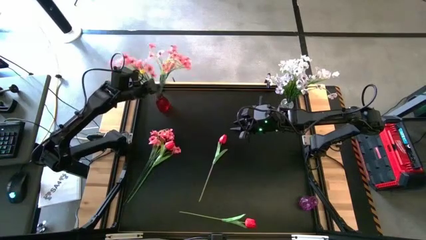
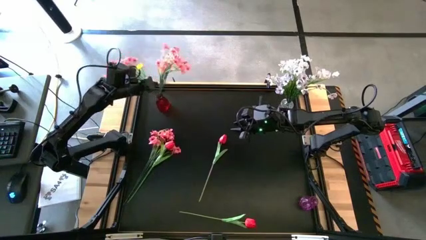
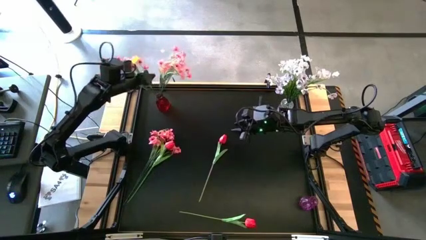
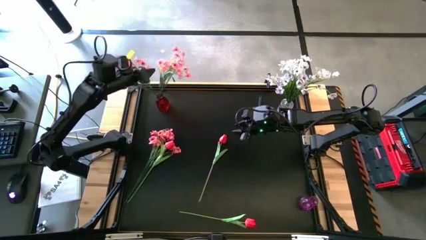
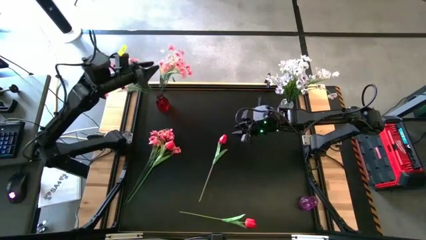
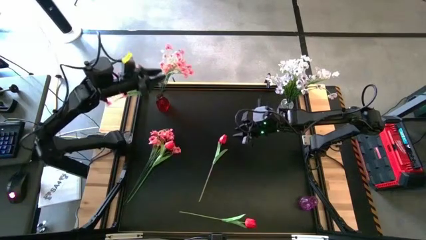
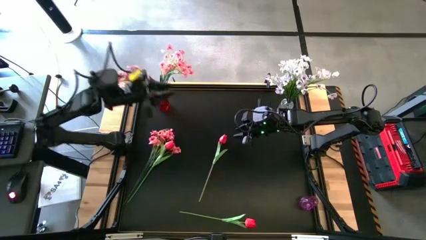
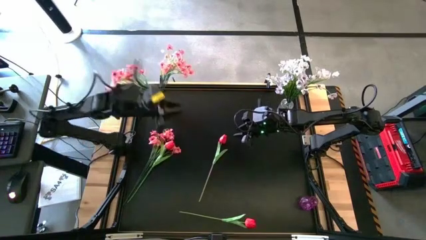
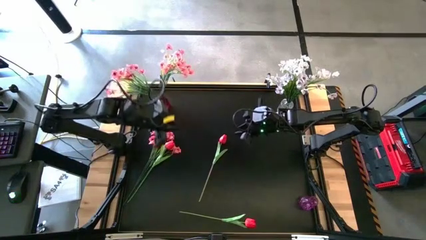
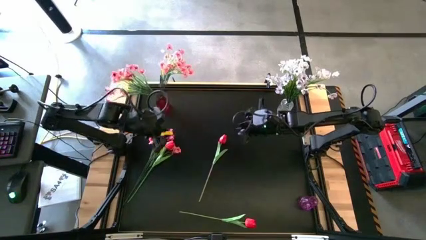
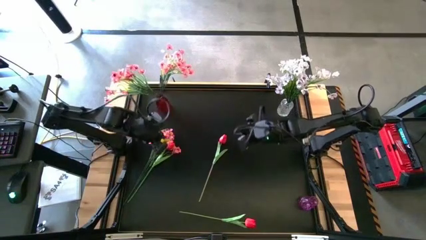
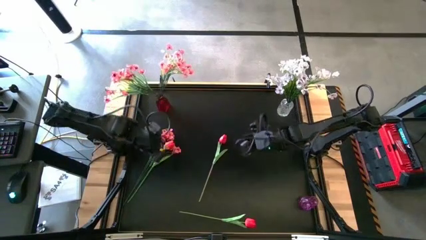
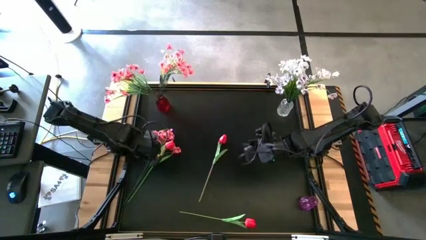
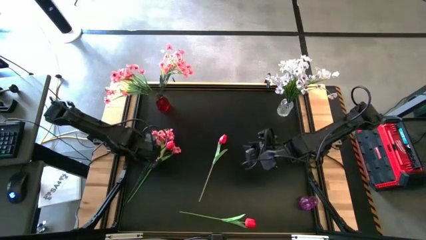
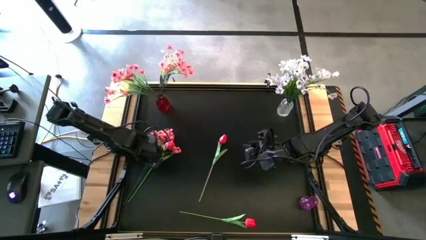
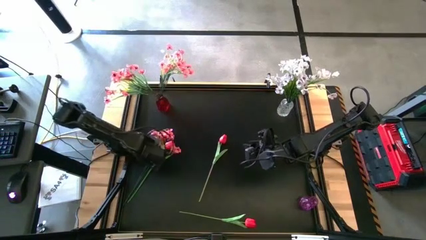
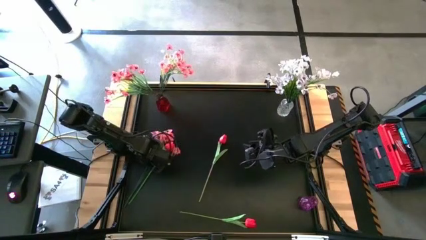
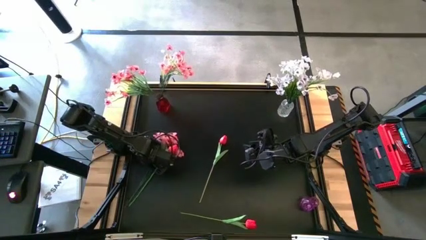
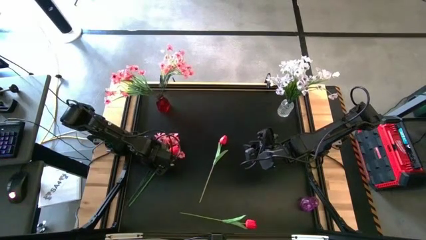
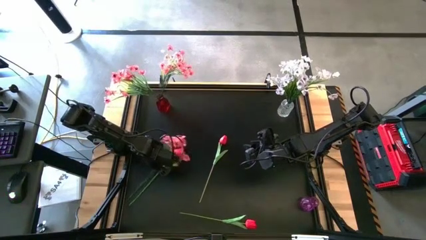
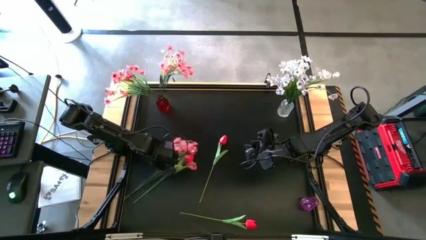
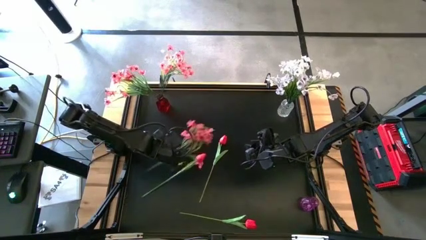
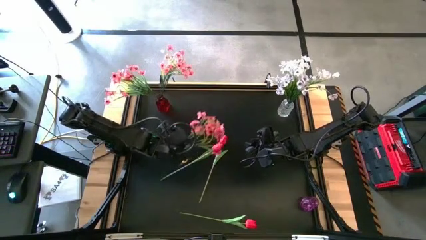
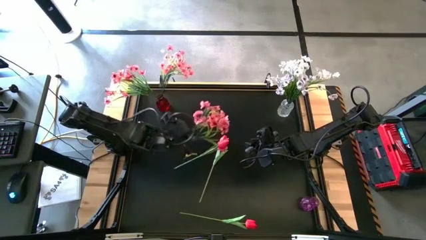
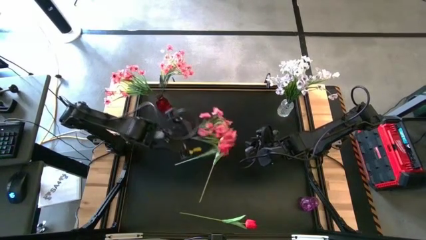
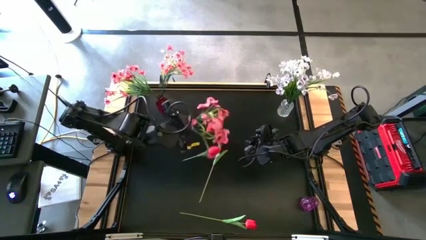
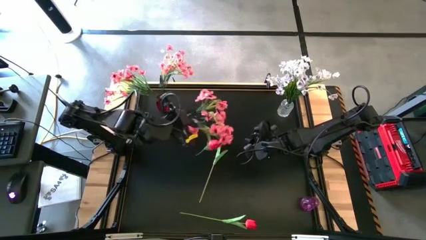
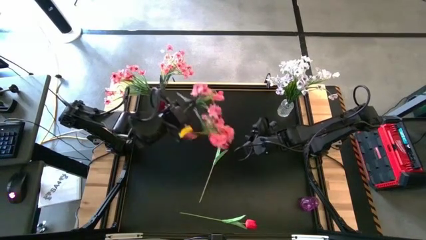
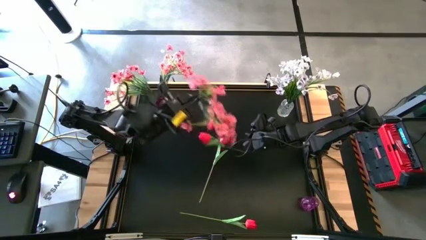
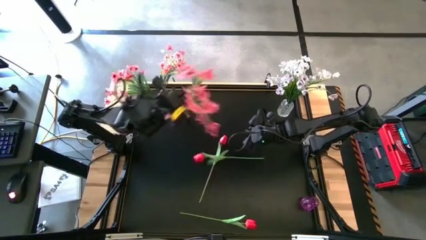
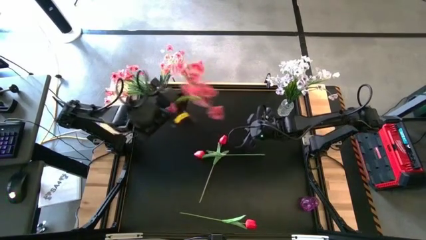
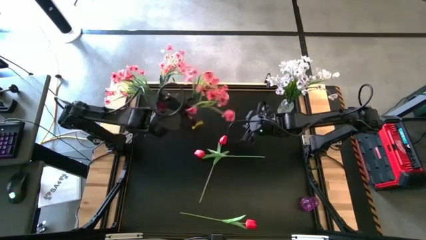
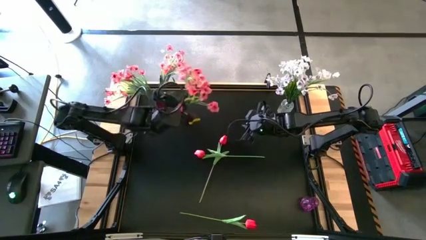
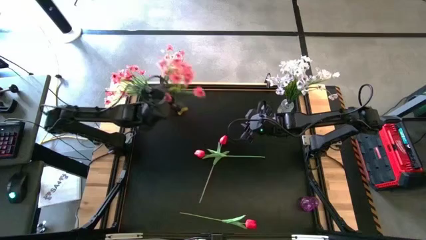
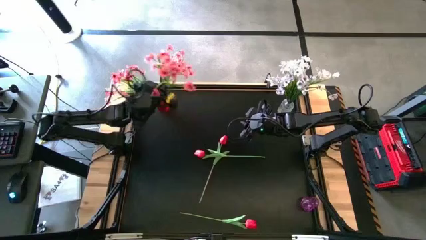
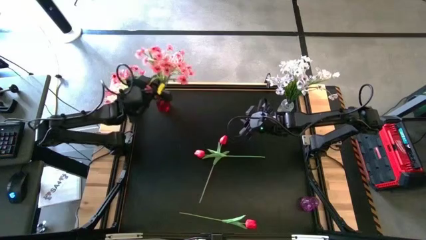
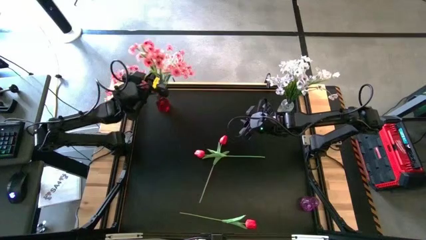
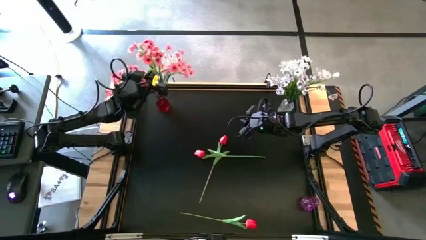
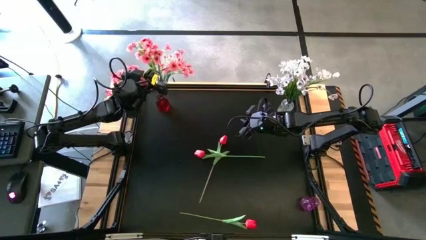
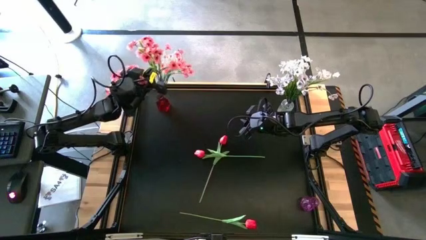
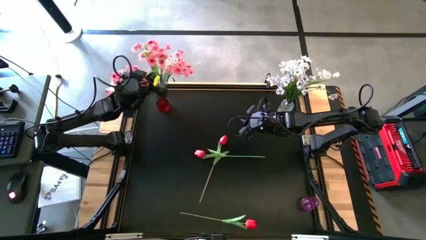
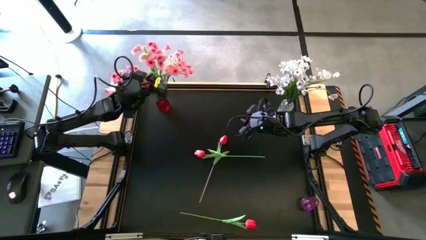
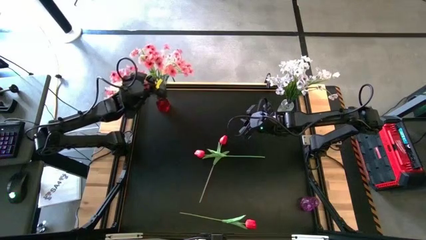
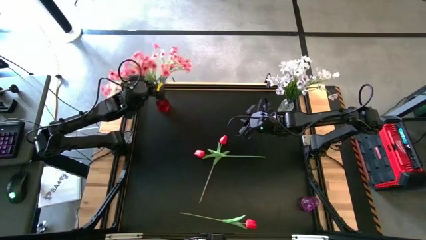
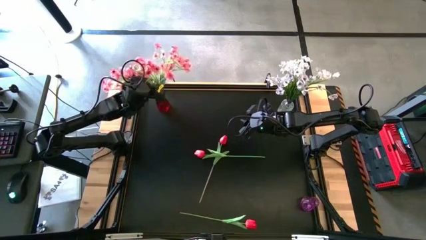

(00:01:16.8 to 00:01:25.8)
Task: Sort flowers into vase by color
Put the pink flowers into the red flower vase

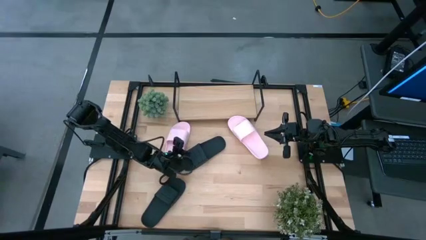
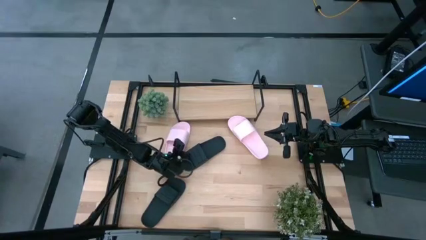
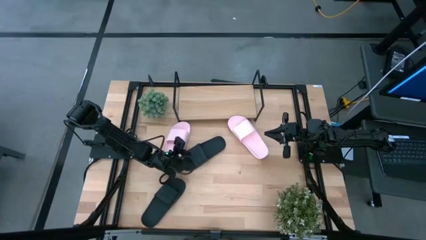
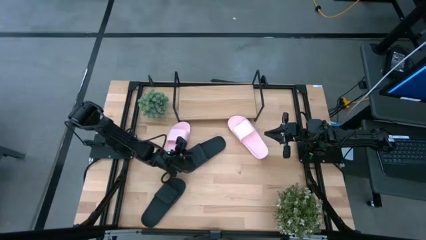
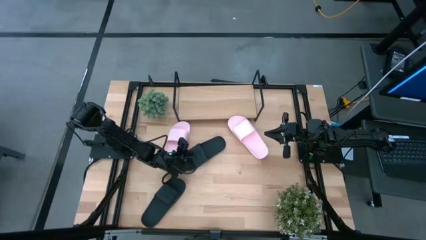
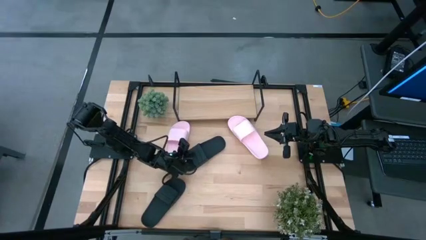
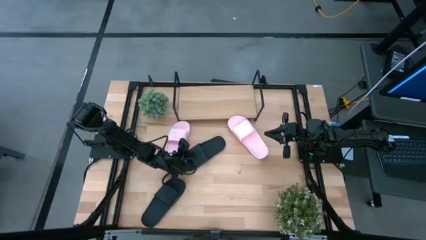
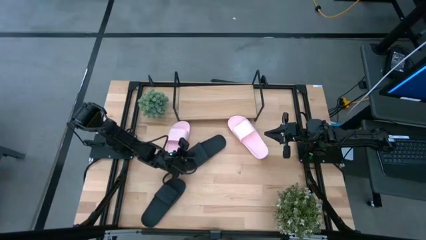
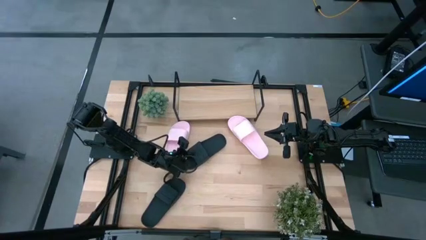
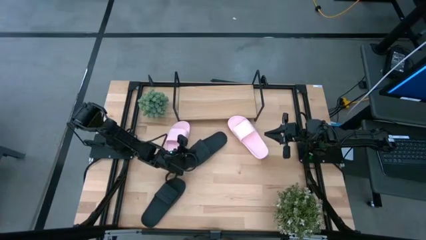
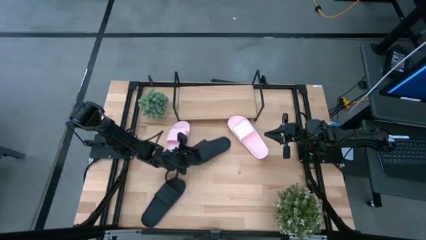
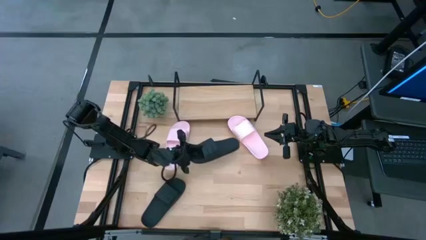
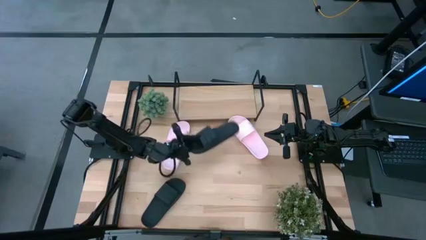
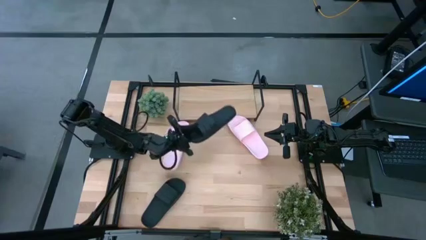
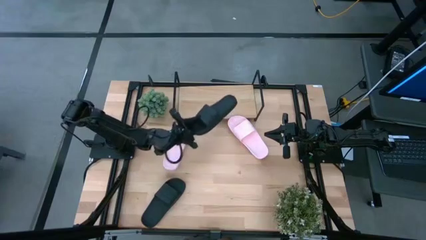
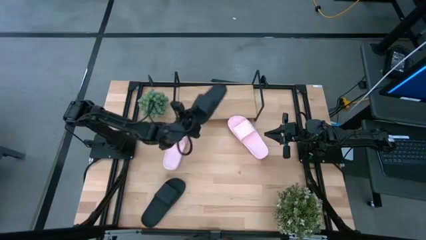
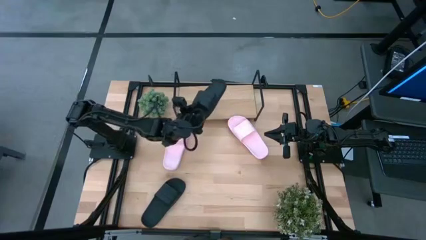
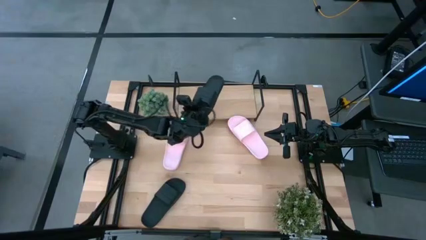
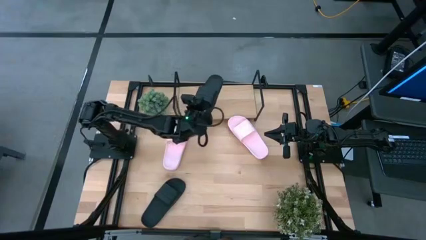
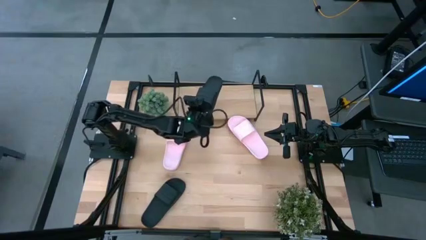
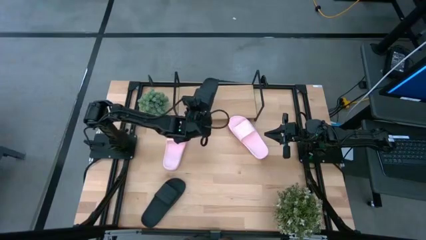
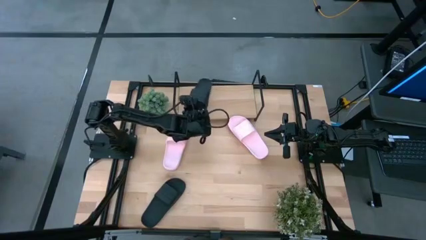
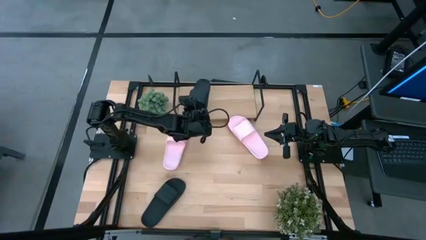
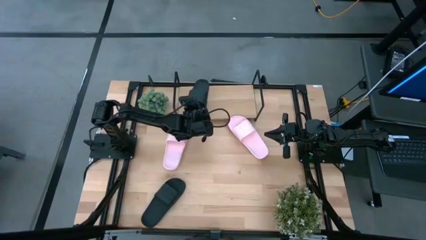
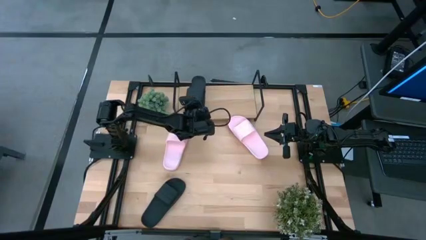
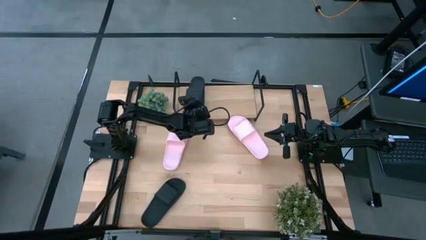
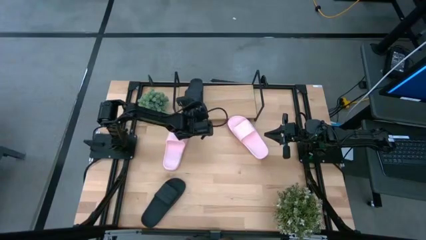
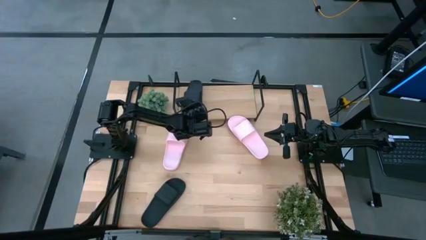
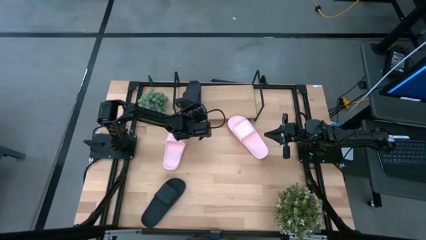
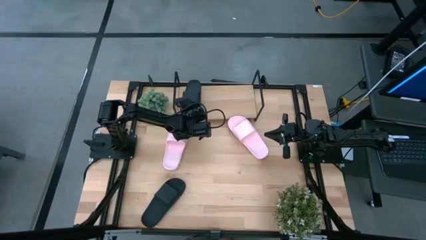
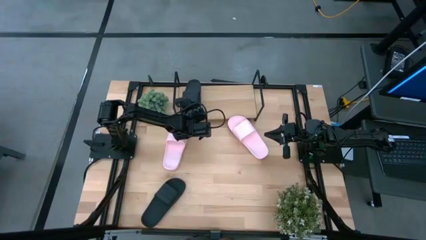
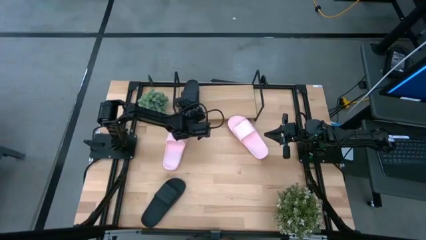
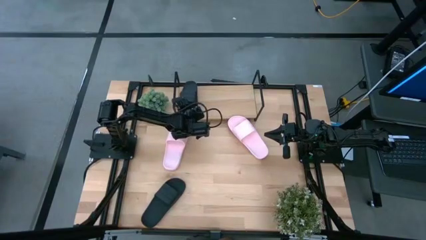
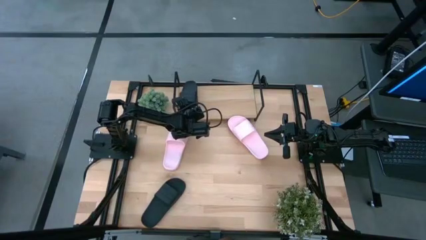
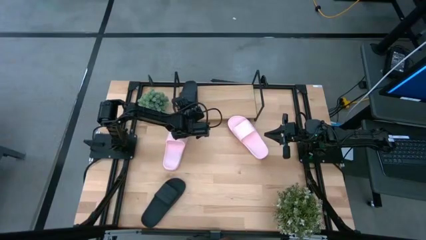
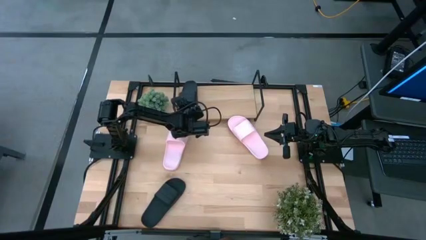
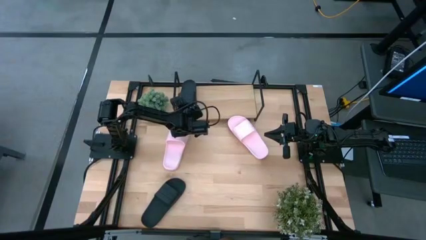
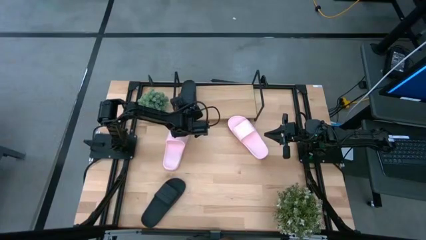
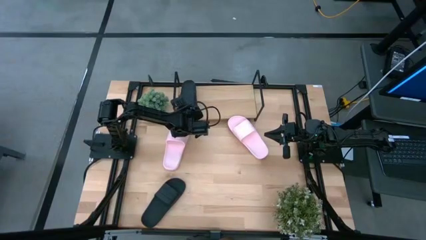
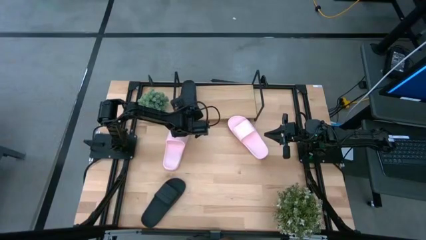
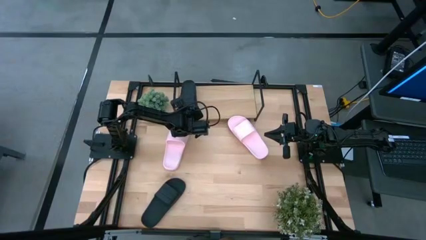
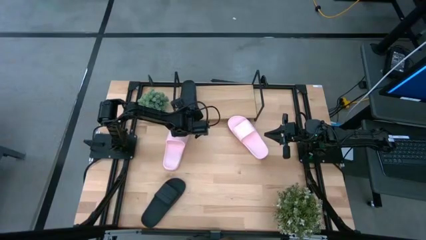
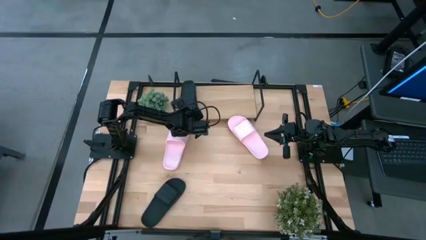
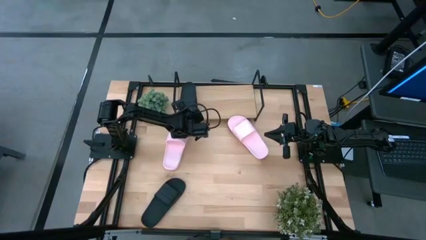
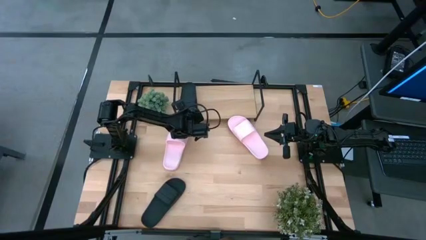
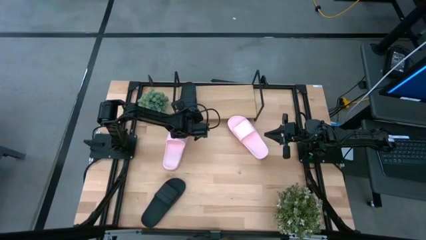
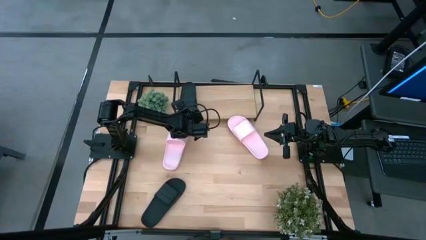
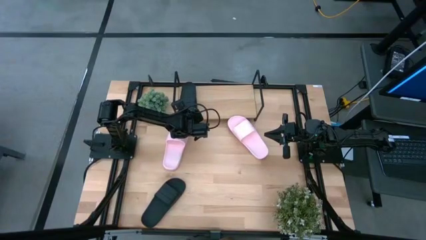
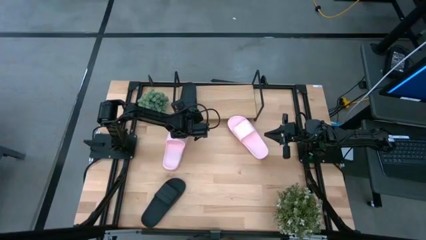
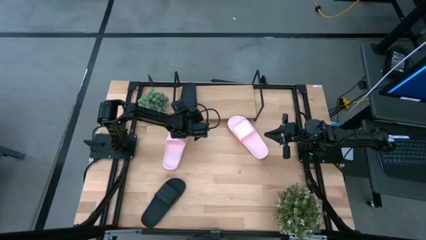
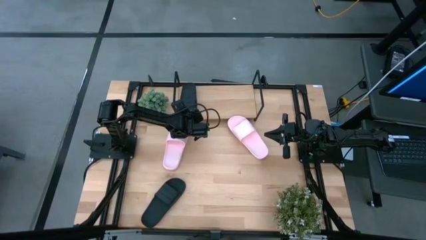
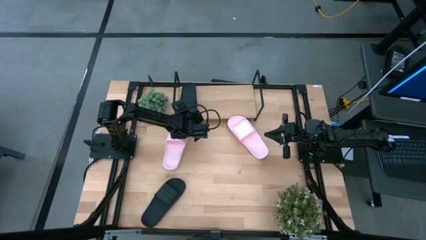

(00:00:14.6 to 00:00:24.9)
Task: Pick and place slides into the shelf
Put the top black slide on the shelf
